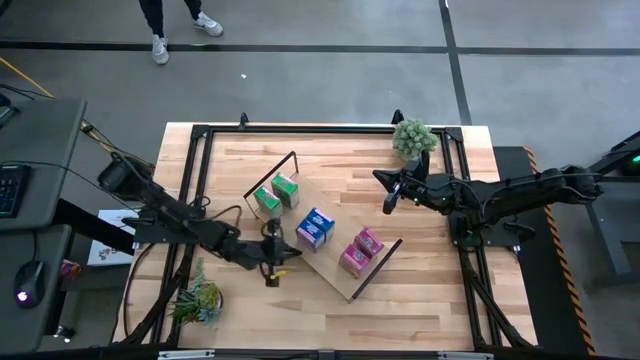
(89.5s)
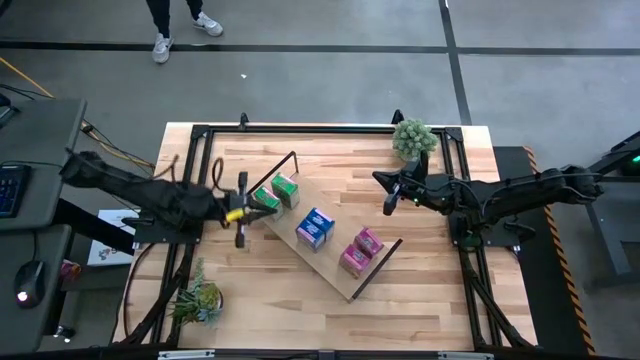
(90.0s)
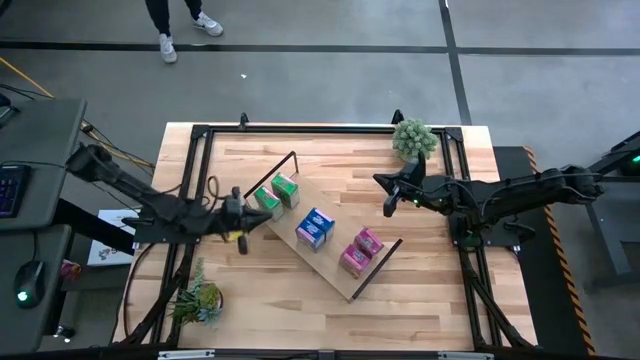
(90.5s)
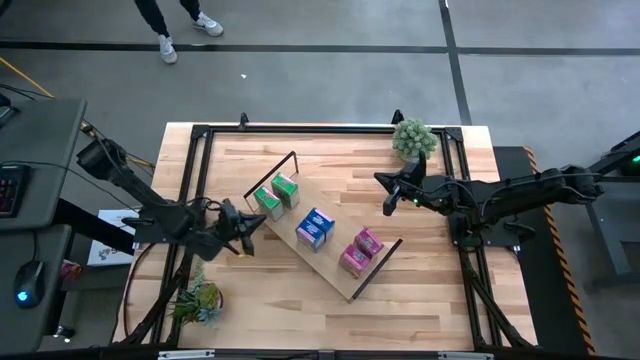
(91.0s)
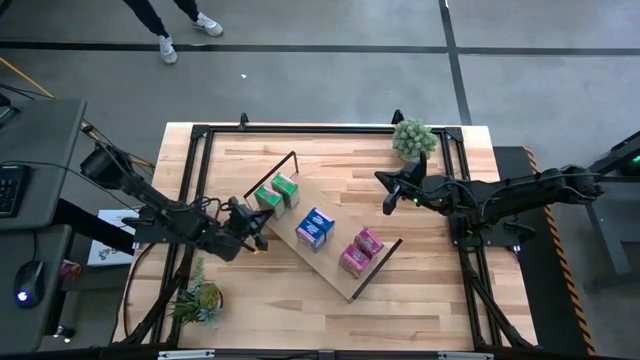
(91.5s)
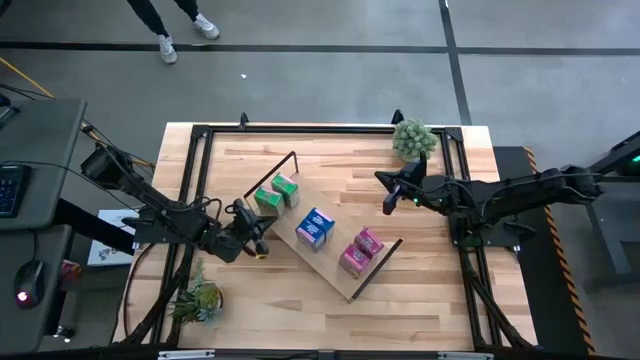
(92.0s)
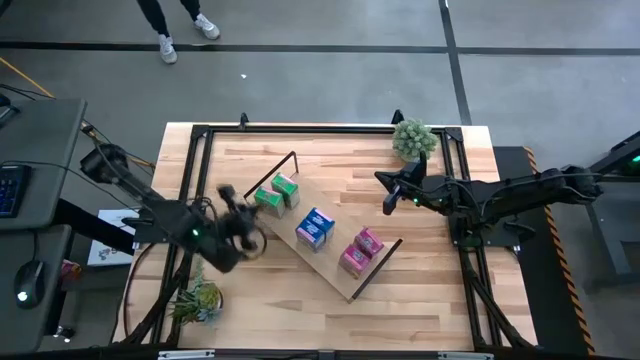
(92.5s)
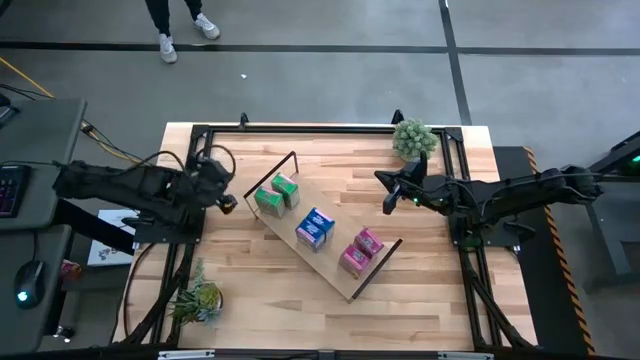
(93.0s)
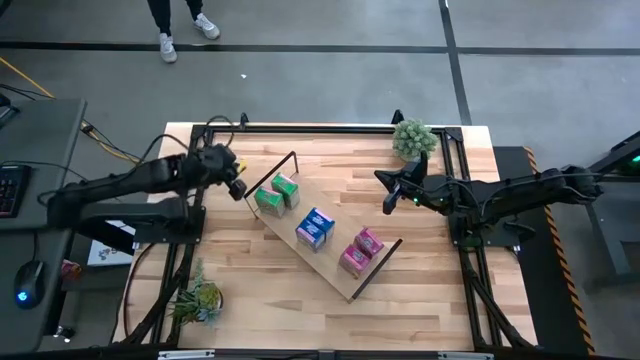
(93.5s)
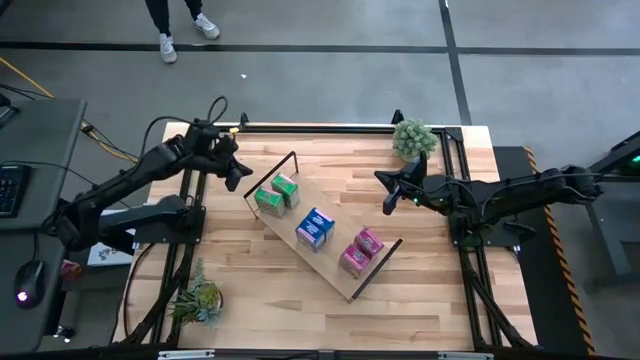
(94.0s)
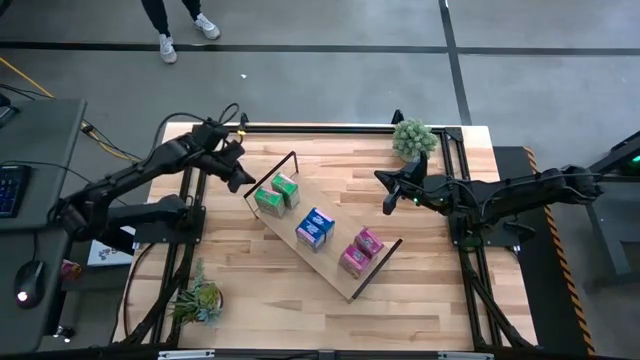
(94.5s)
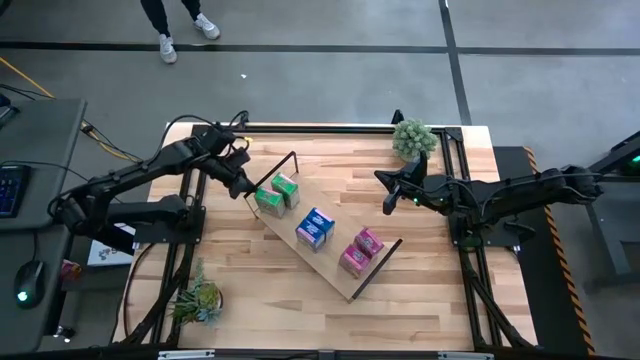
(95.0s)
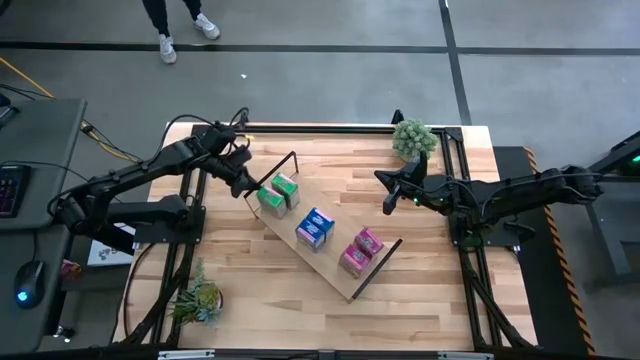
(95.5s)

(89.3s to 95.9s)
Task: Stack cereal on shelf
Adjust the green cereal box

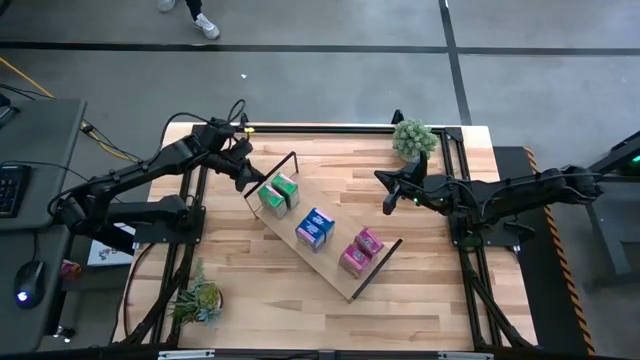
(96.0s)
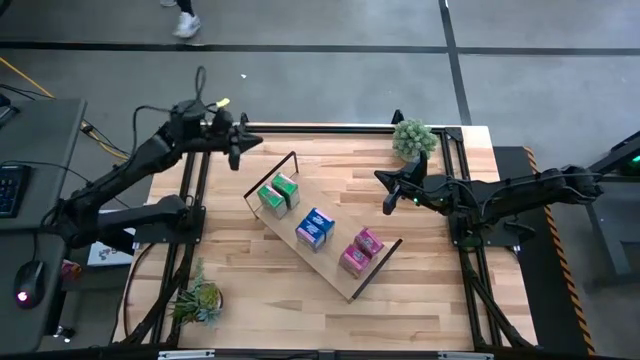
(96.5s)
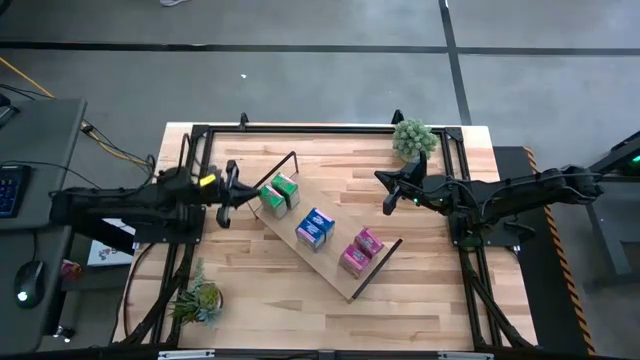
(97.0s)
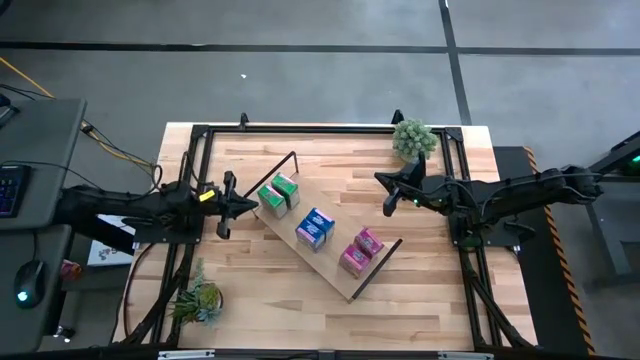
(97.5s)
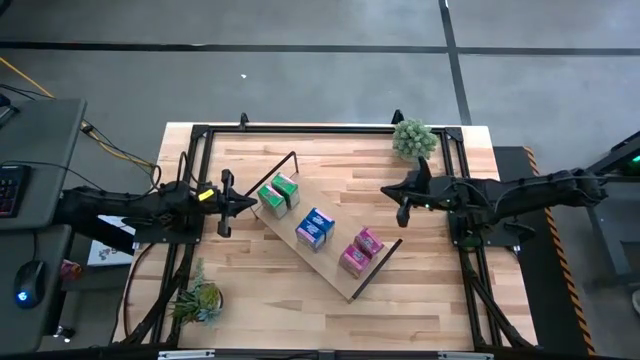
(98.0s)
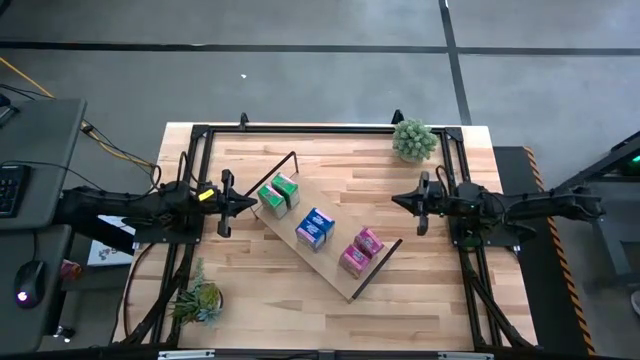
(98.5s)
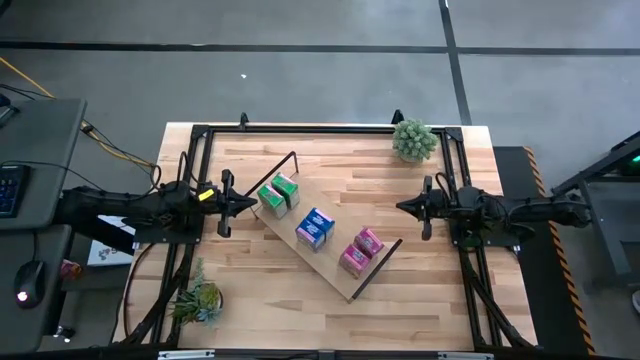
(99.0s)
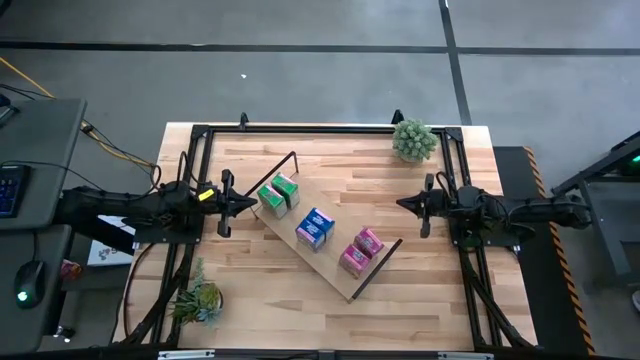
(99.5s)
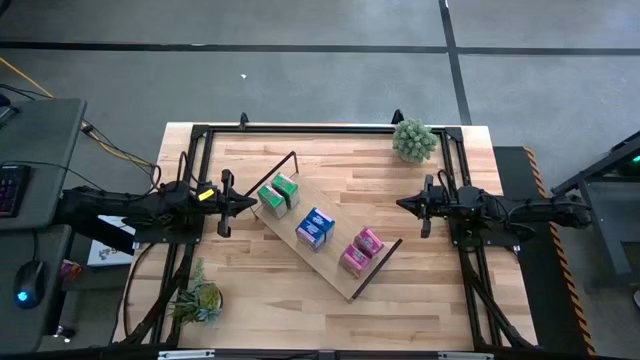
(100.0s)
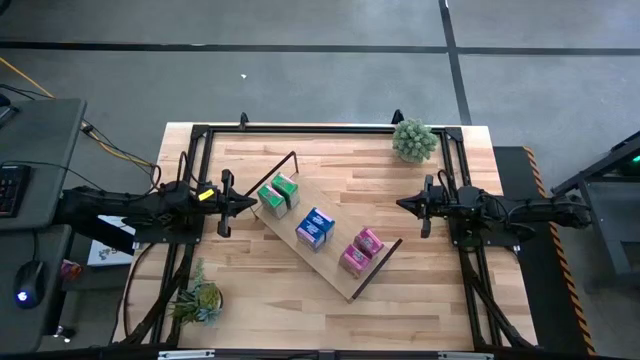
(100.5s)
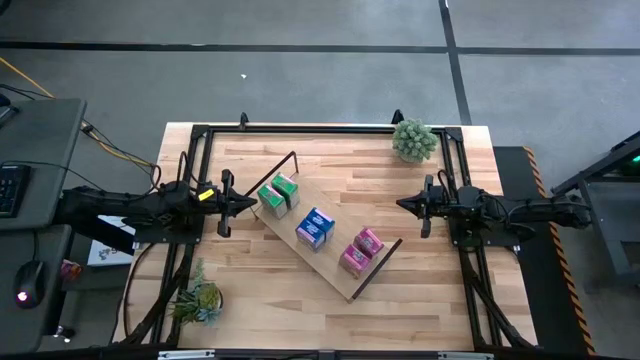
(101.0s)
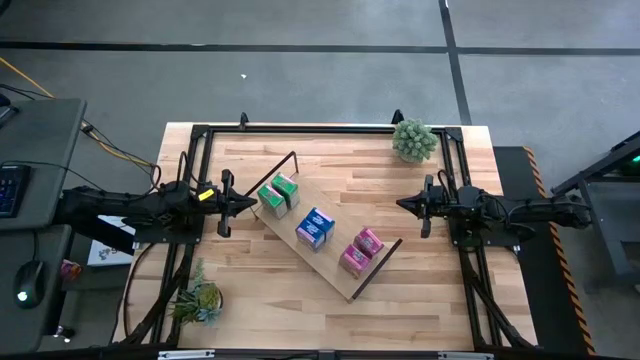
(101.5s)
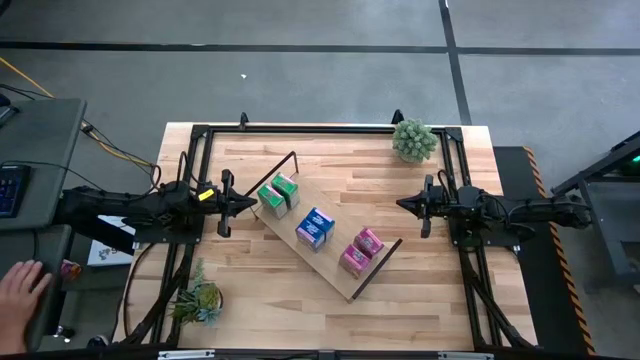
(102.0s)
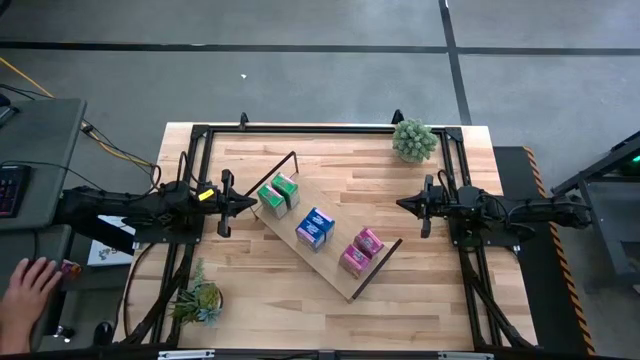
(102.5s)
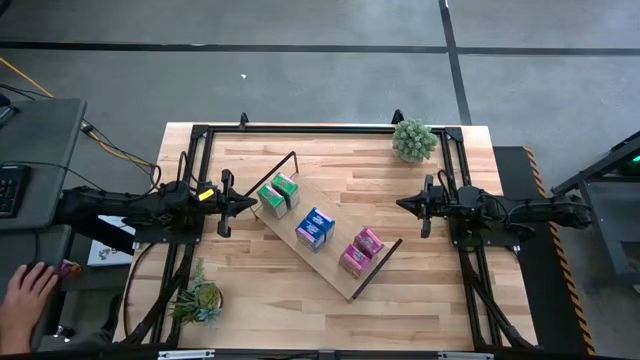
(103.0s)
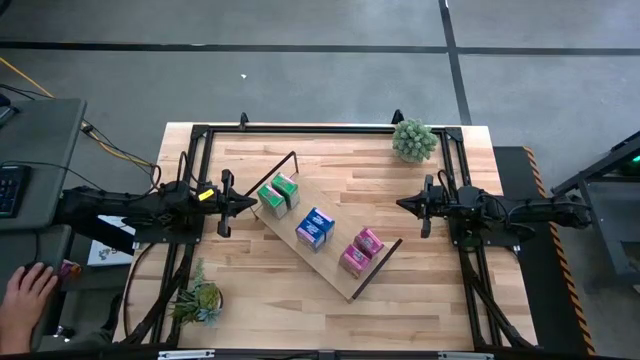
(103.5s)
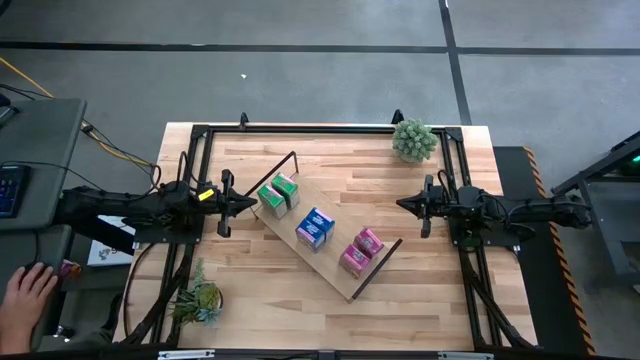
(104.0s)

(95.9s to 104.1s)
Return to Home Position

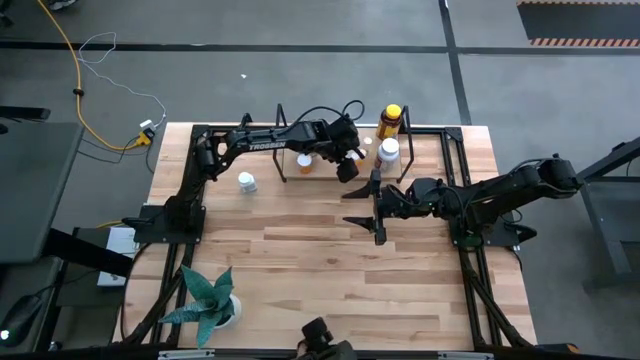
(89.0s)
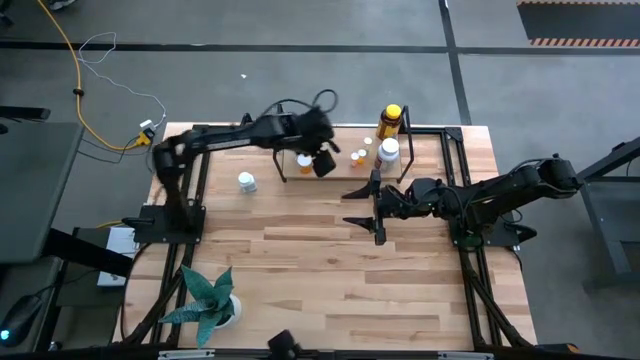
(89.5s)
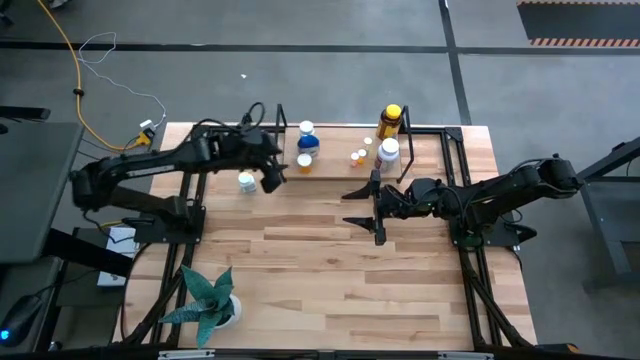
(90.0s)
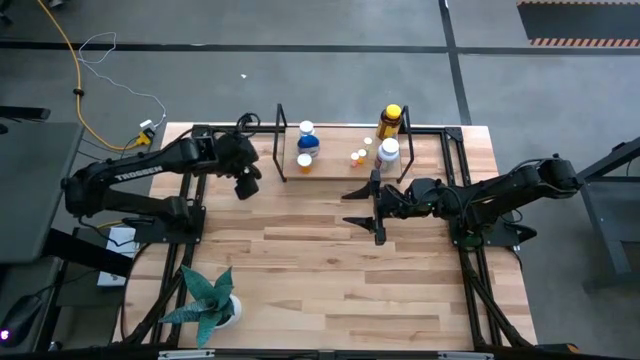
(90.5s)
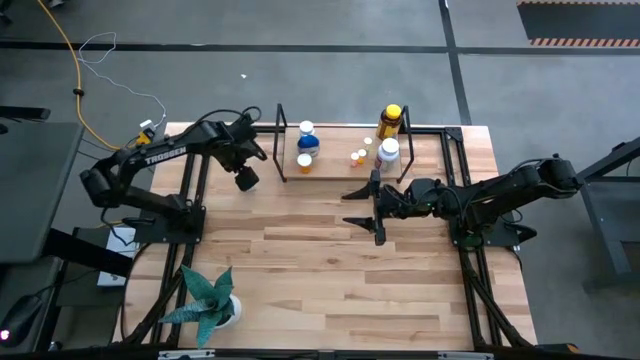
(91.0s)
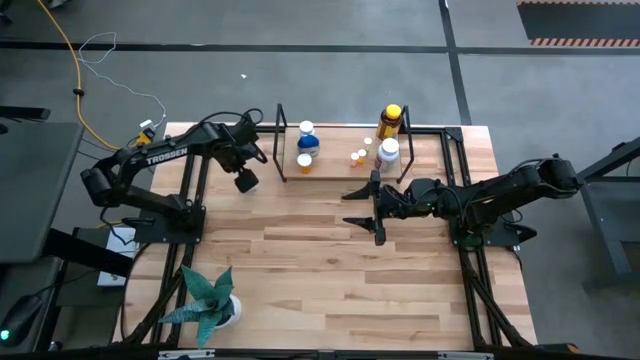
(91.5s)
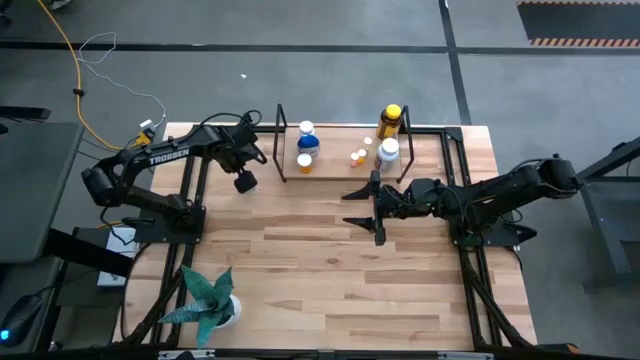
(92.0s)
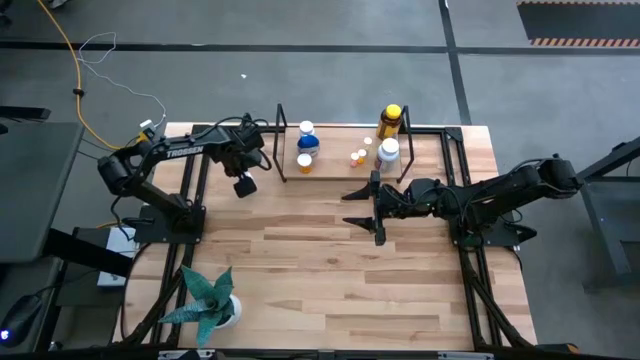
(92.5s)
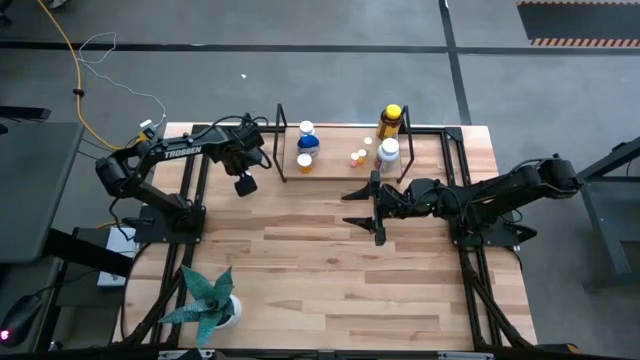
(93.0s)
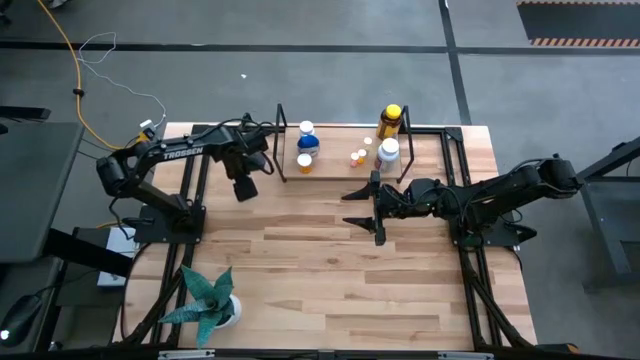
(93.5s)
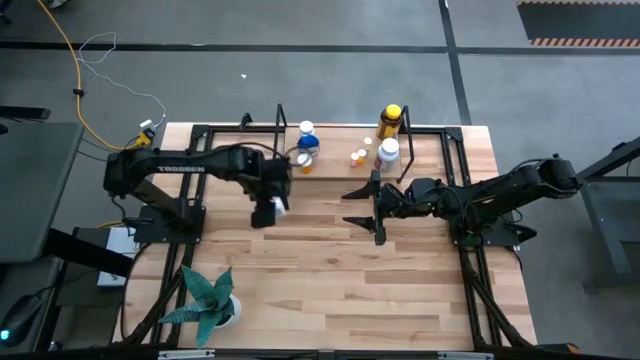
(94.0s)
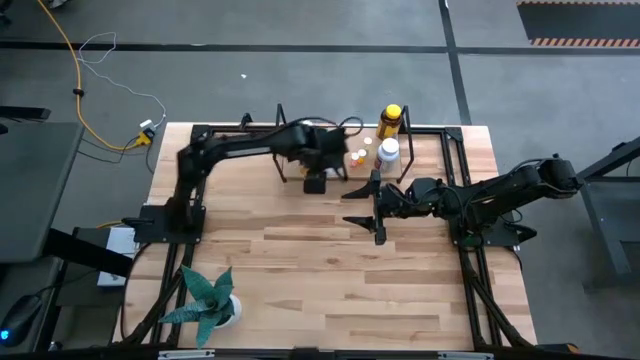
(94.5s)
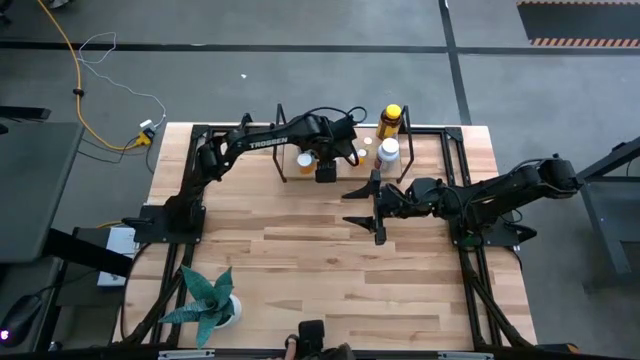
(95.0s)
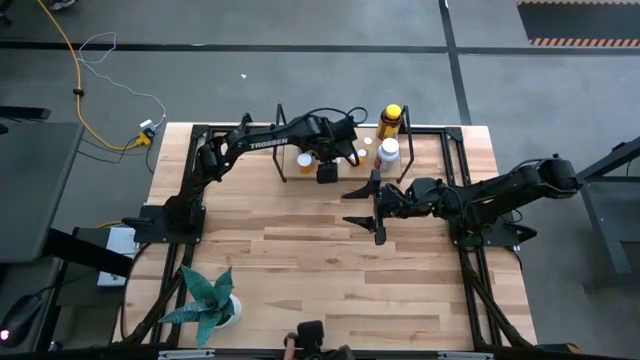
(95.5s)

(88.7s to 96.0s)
Task: Pick and place medicine bottles onto shelf by color
Put the light blue pill bottle on the shelf
